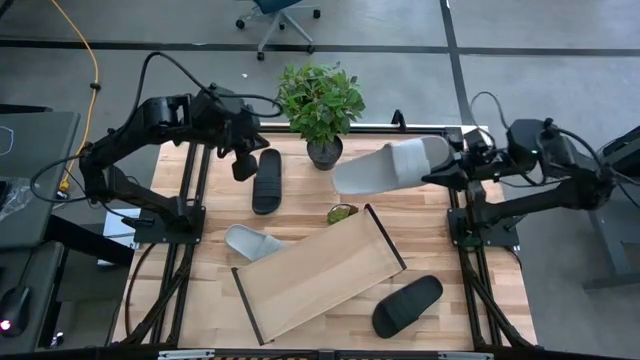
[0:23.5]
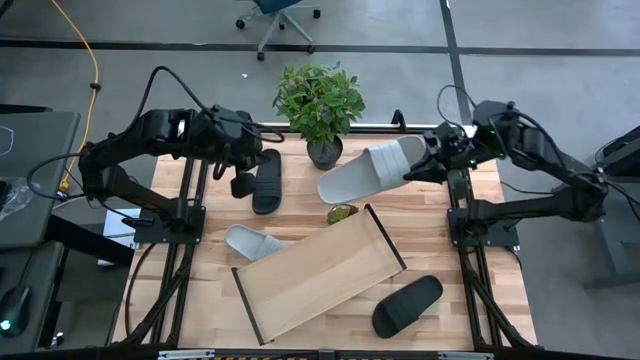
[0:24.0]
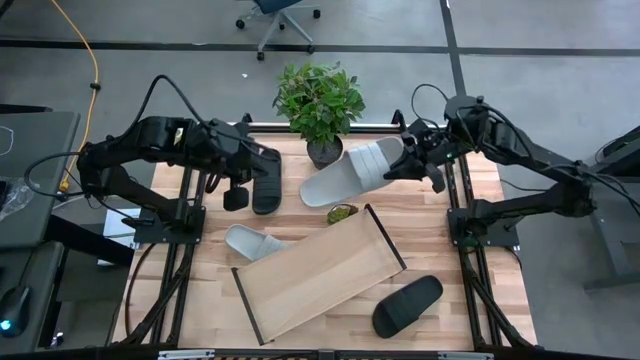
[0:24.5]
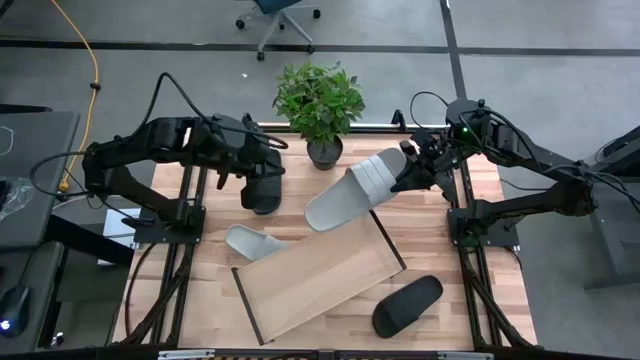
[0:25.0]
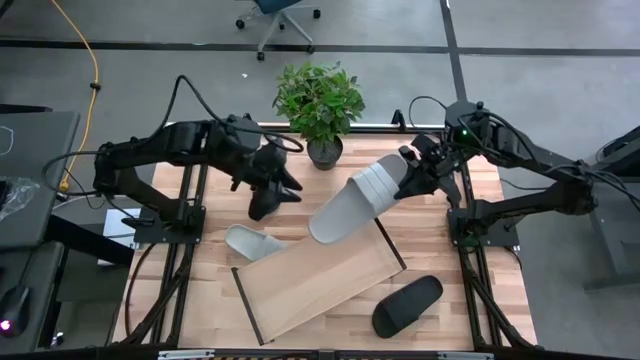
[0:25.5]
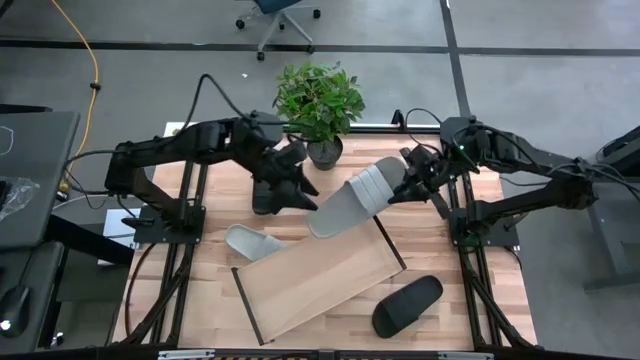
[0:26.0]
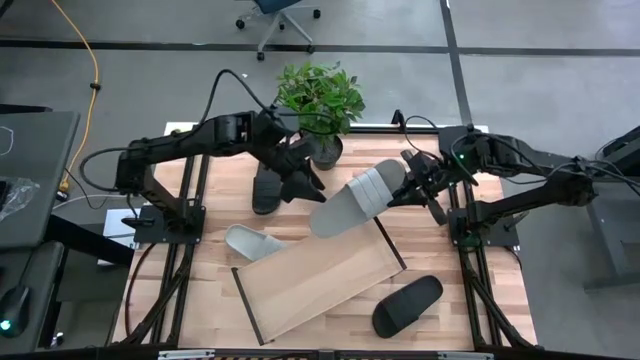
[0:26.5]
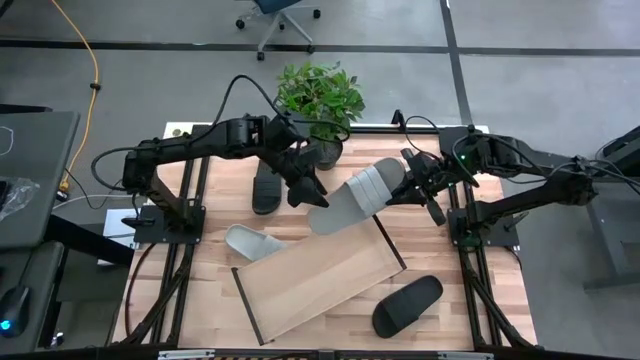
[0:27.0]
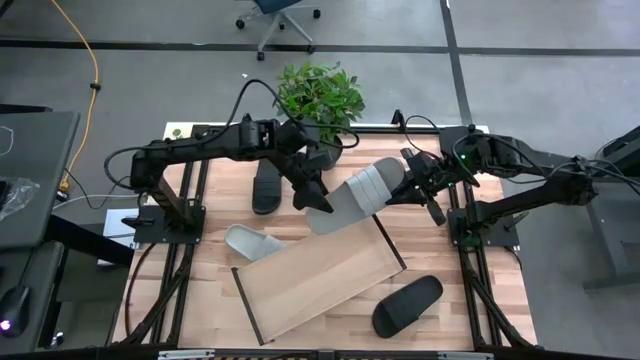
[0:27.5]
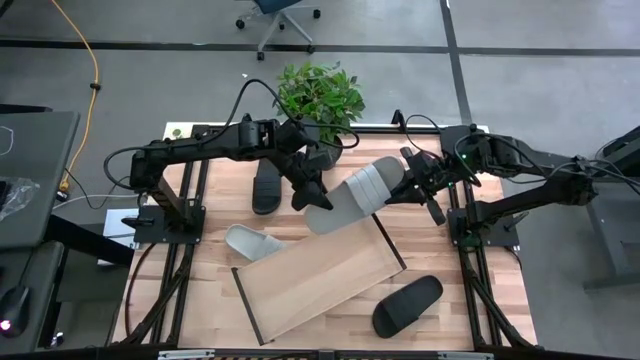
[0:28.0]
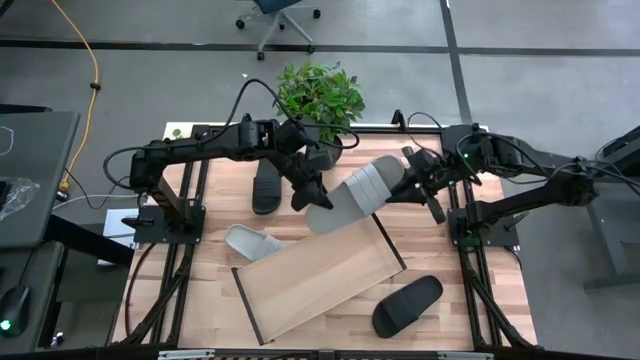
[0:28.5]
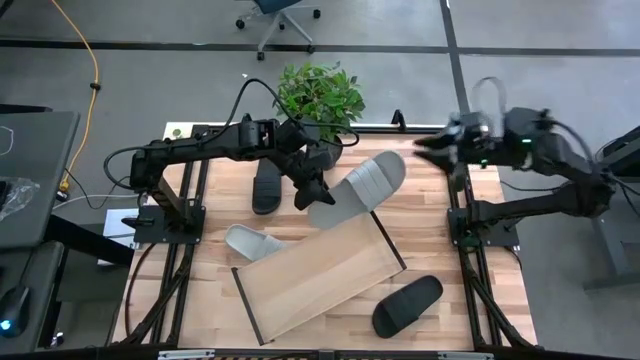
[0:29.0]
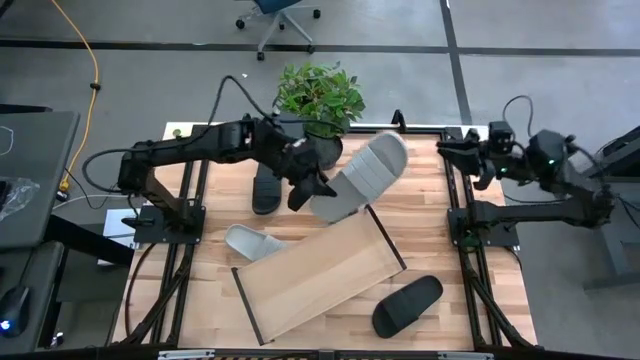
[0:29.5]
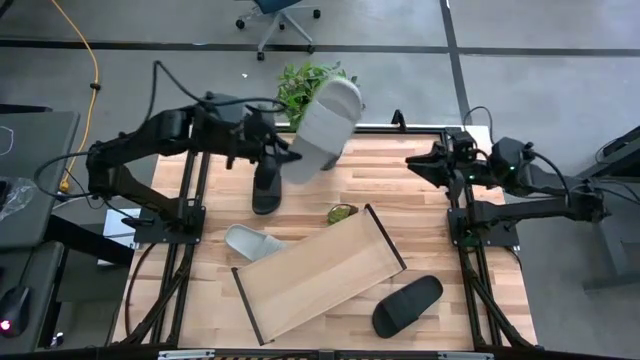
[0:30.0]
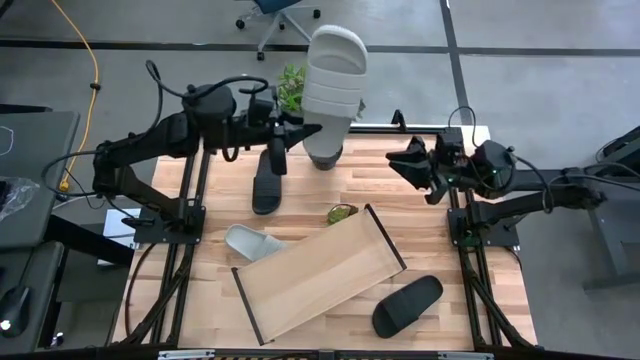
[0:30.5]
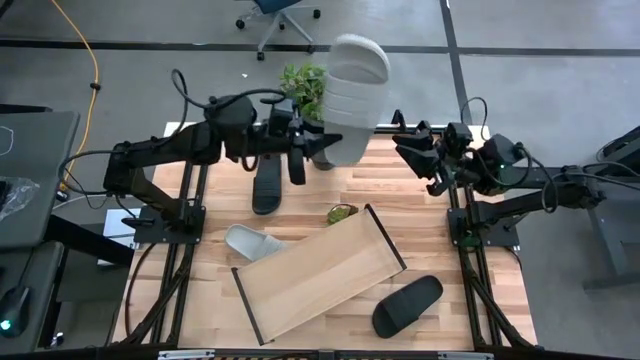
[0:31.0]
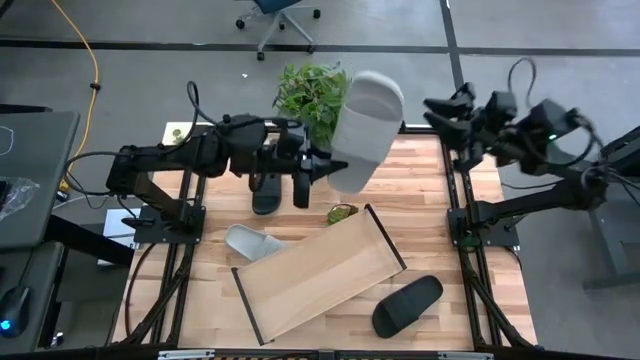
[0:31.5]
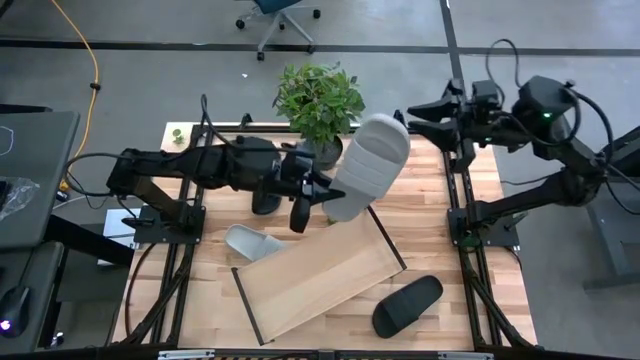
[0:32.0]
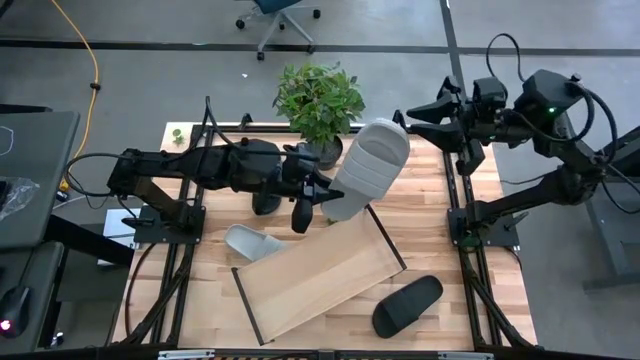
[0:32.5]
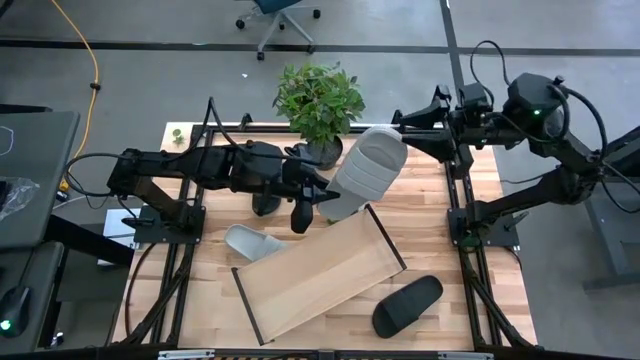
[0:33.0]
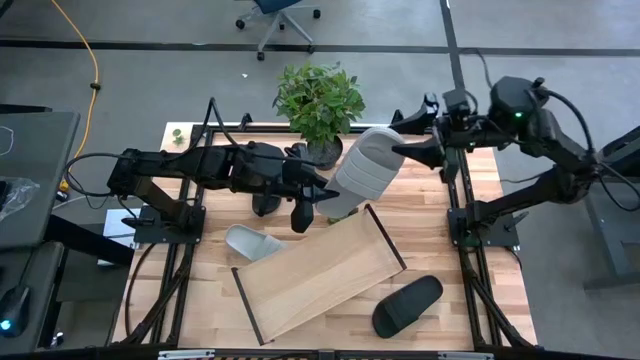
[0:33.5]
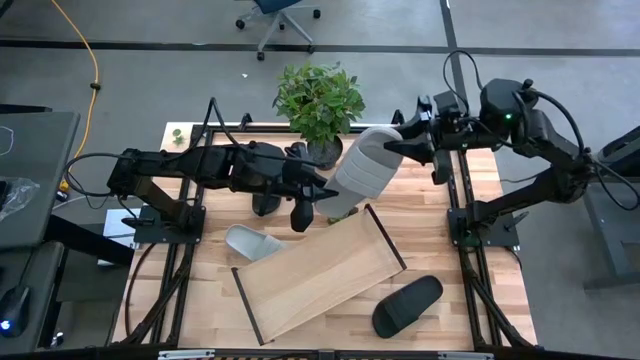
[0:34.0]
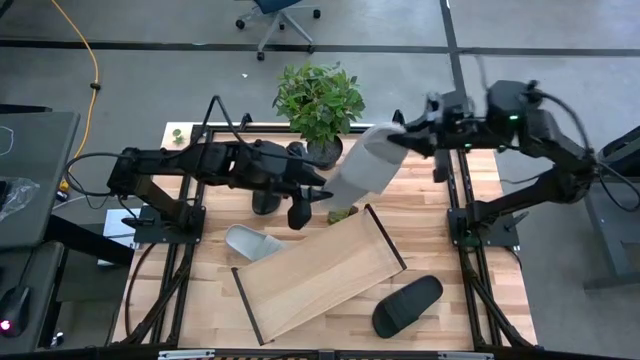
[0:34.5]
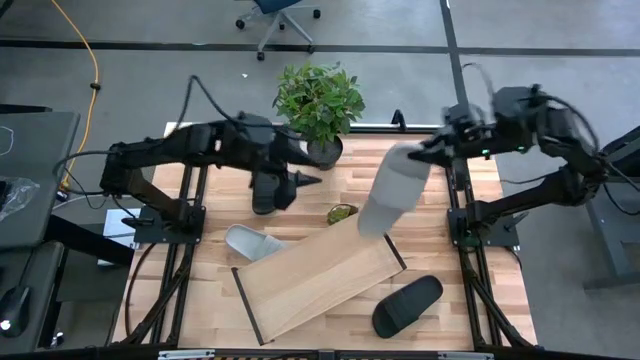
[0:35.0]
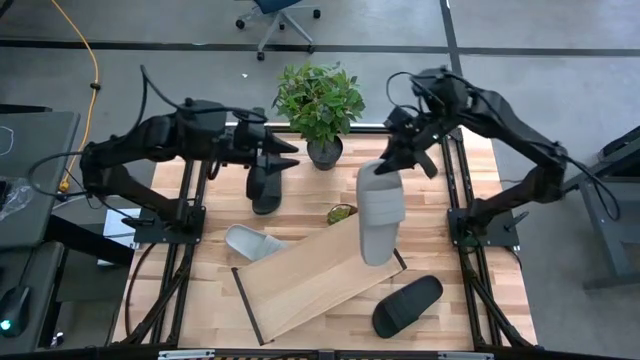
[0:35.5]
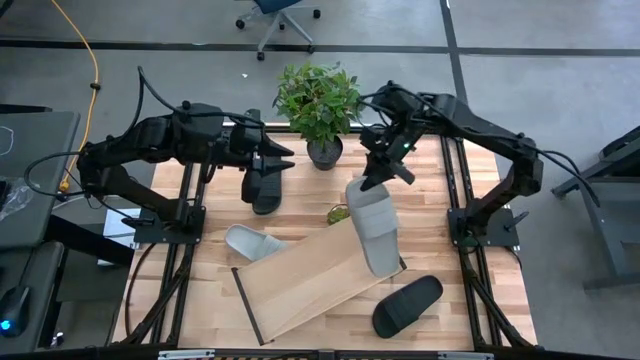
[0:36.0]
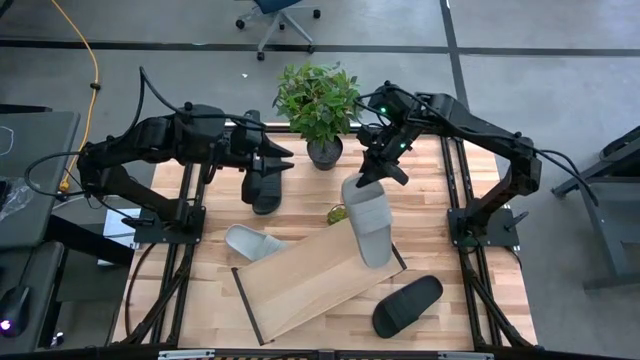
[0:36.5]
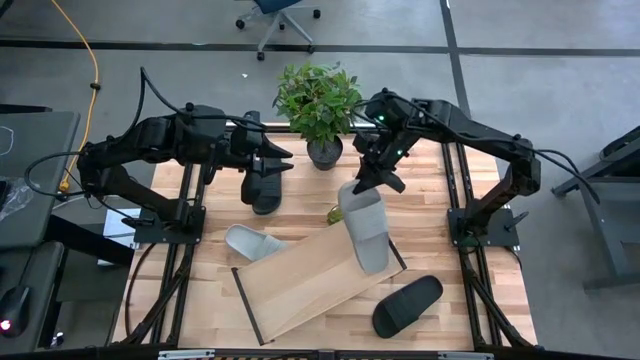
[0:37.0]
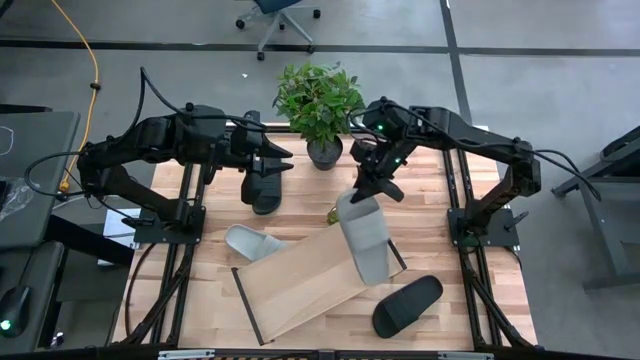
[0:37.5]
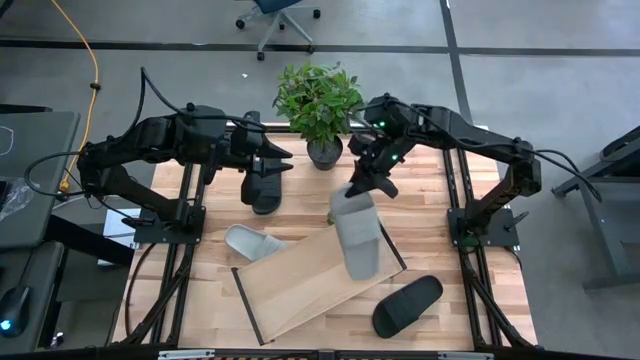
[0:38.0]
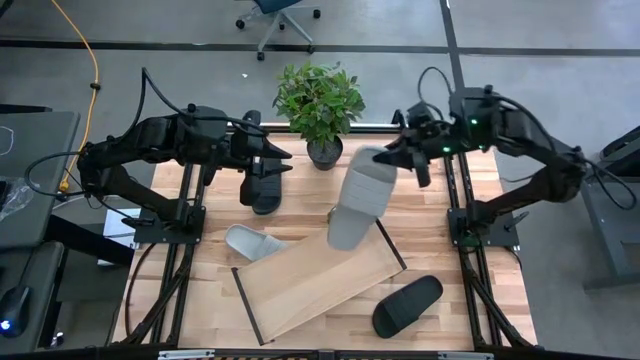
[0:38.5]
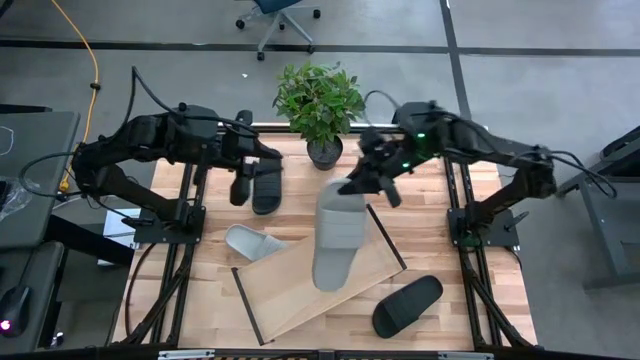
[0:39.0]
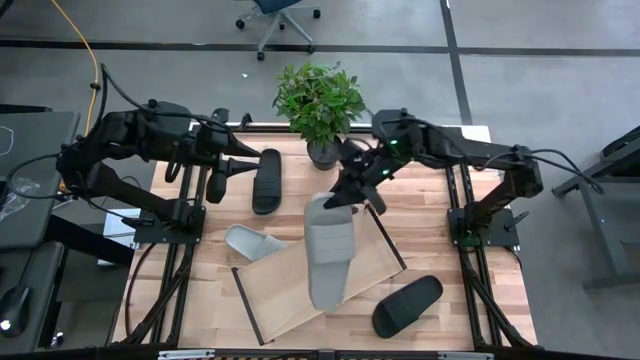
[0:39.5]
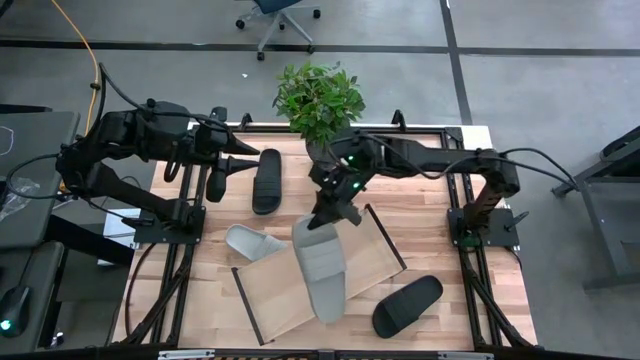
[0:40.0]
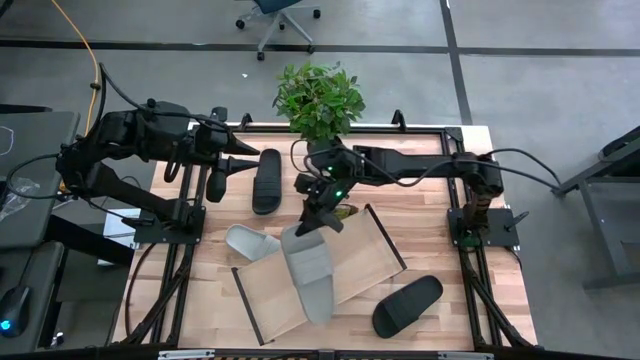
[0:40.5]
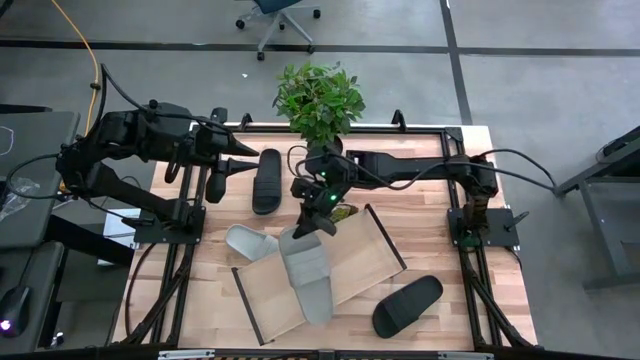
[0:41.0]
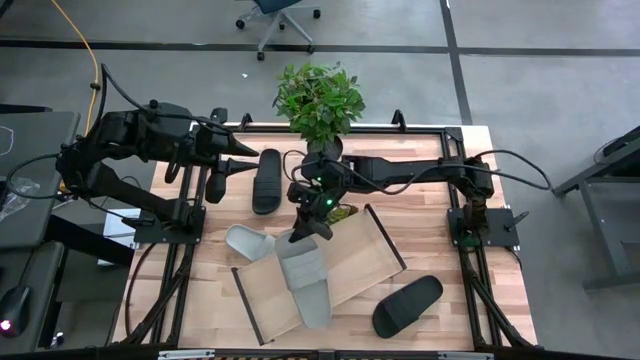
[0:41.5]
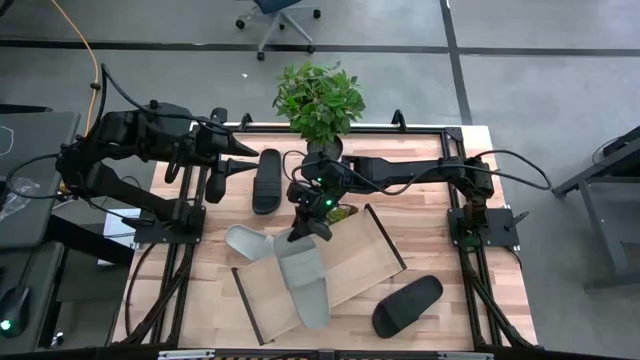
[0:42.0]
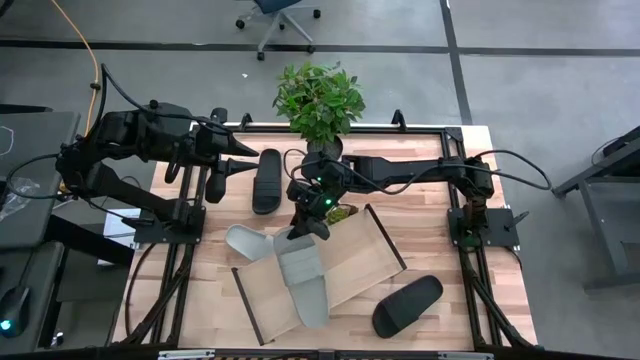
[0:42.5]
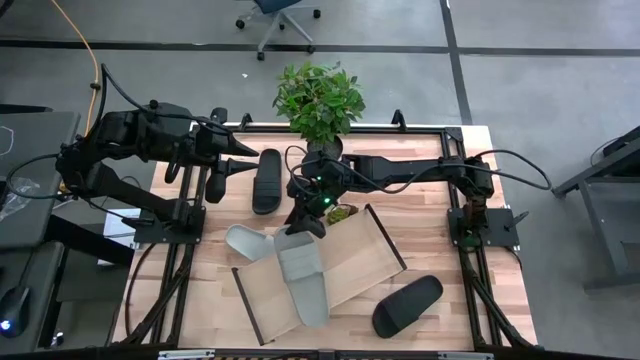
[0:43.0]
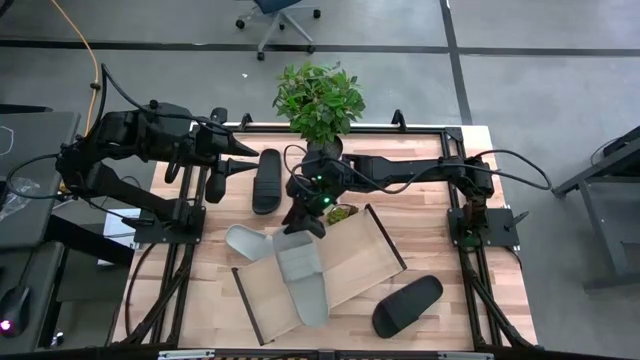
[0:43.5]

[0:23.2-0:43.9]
Task: Pick and place slides into the shelf
Put the right gray slipper on the shelf

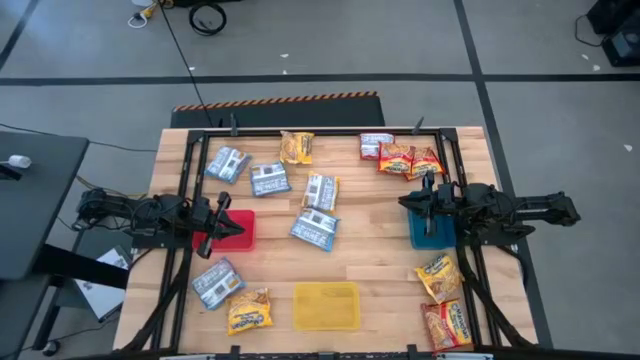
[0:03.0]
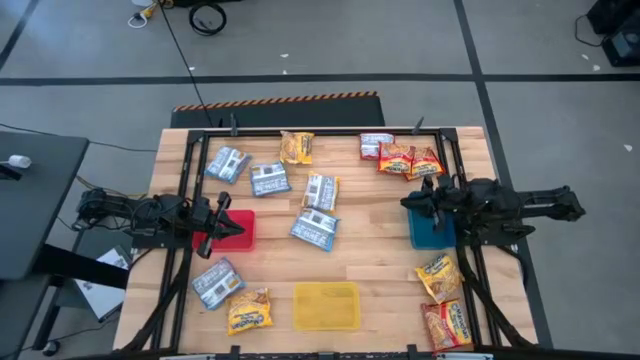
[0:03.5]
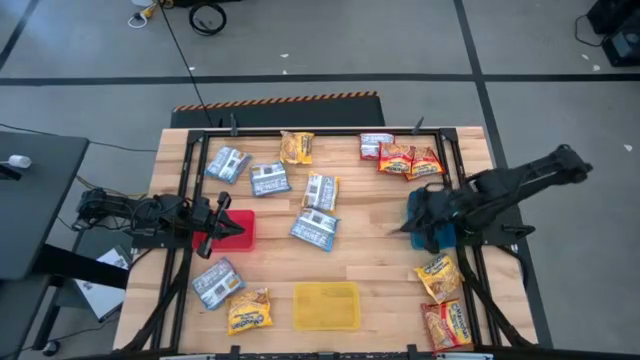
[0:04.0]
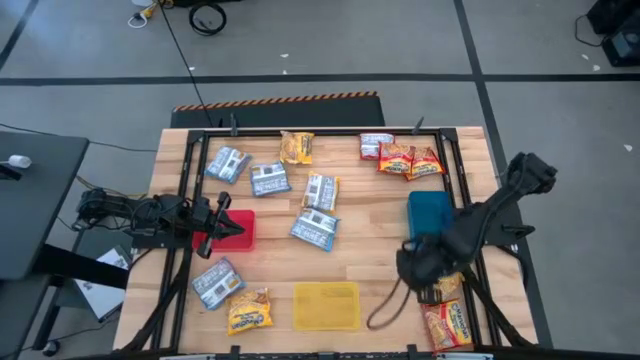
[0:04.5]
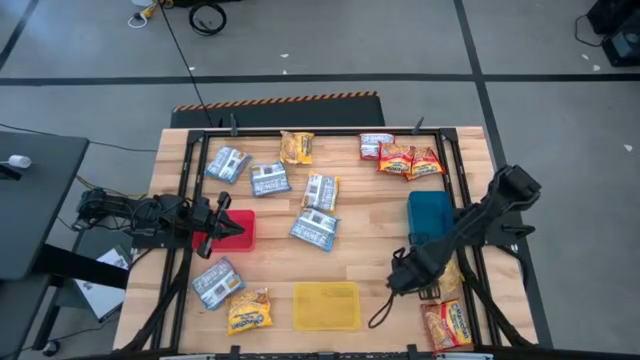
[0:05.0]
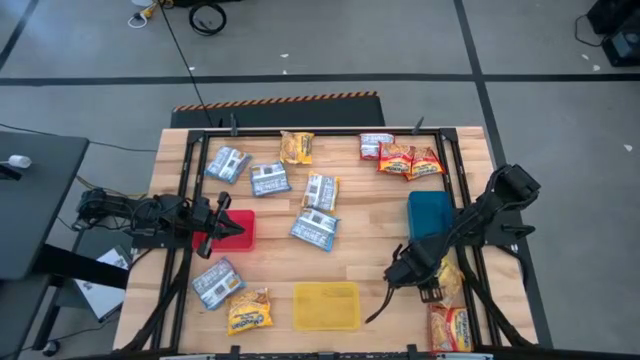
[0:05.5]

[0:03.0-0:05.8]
Task: Sort Maruchan noodles
Put the yellow noodle pack into the blue bin
